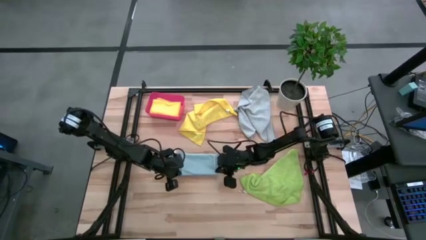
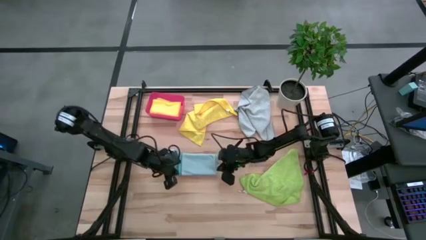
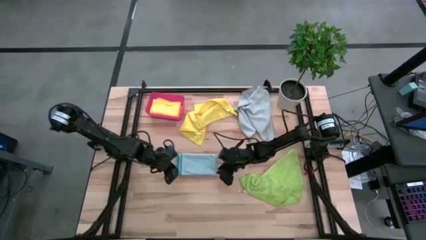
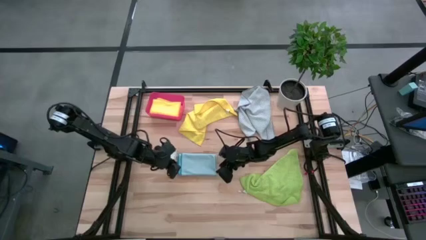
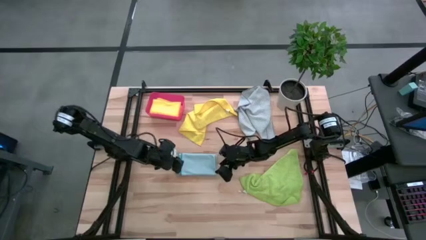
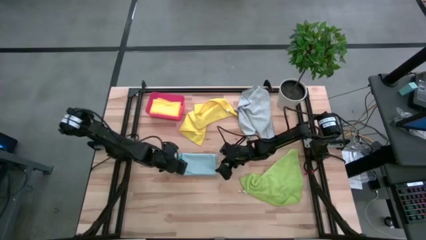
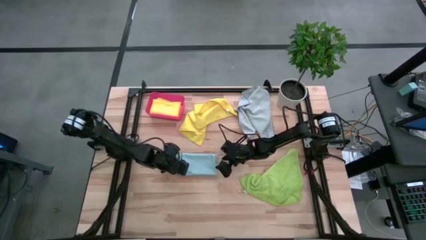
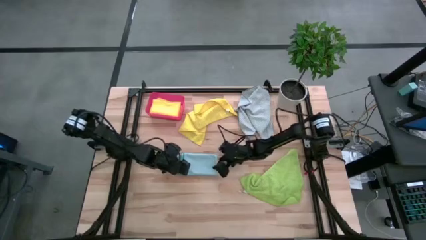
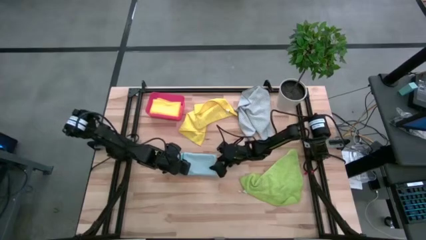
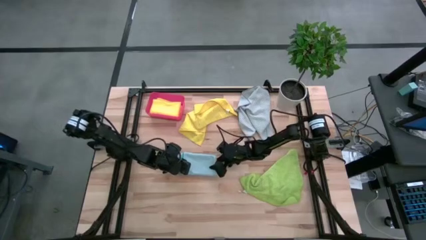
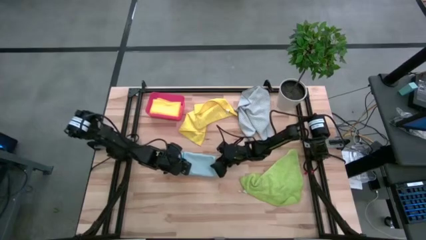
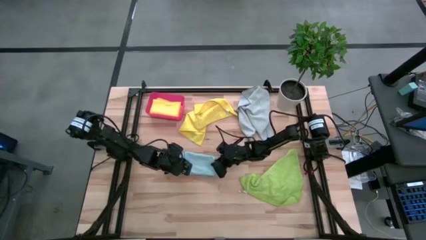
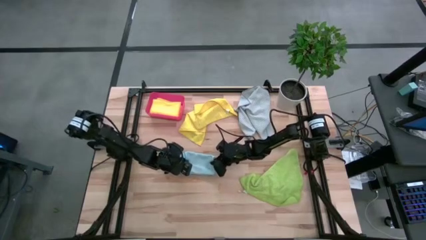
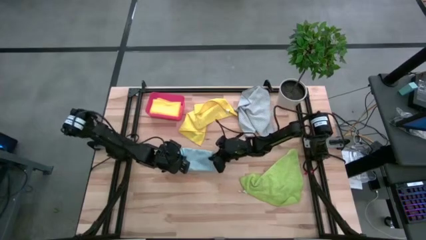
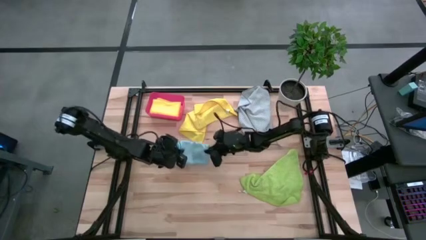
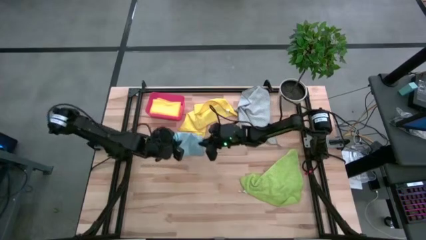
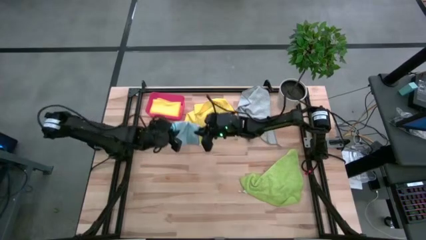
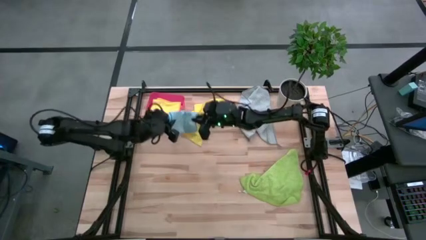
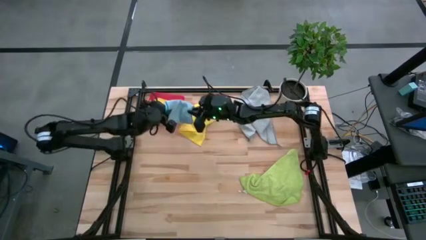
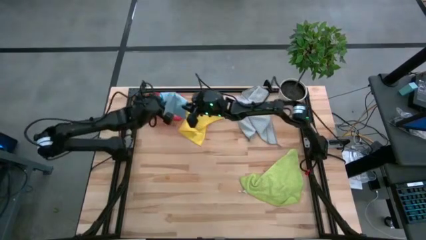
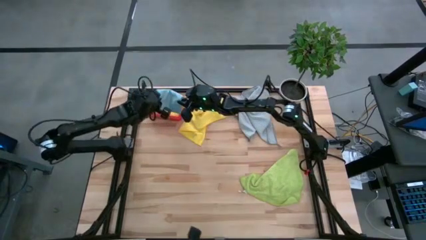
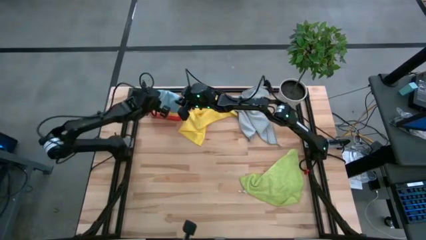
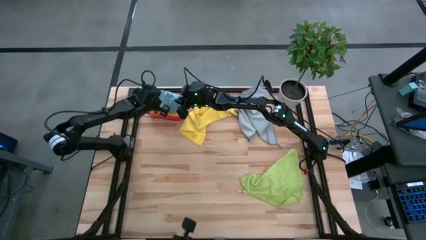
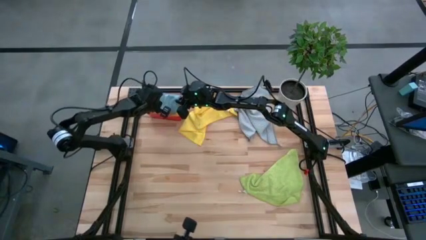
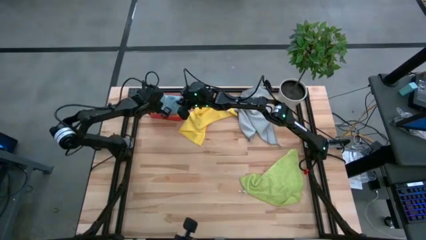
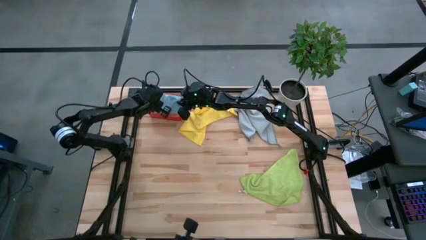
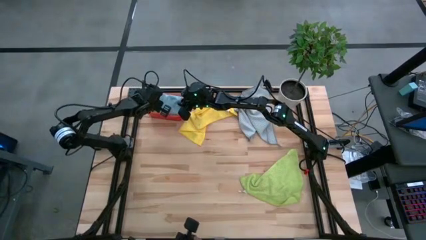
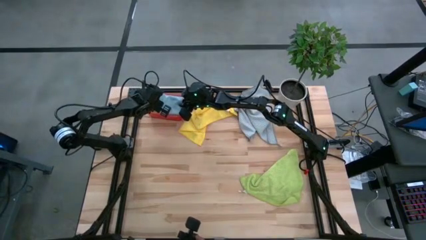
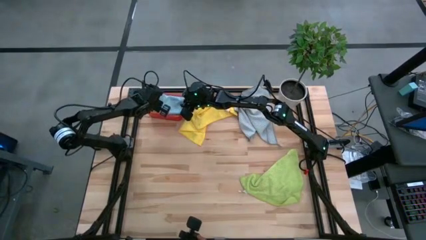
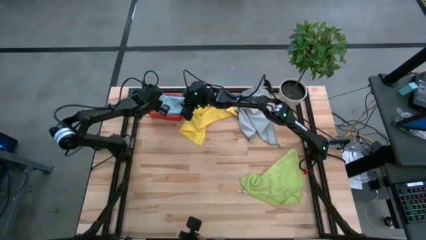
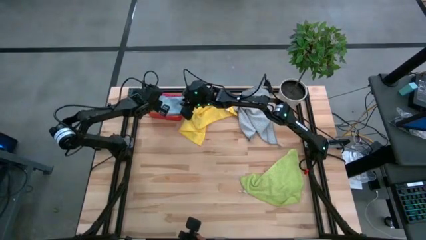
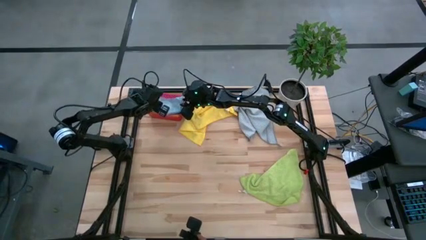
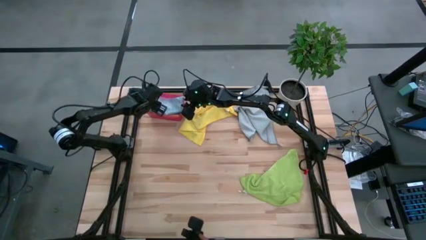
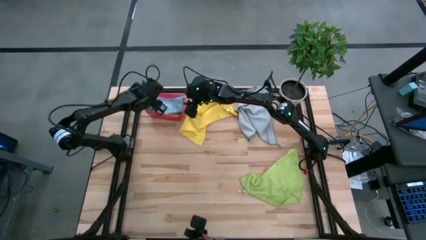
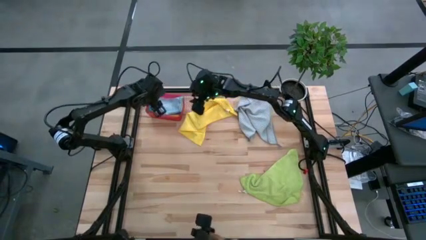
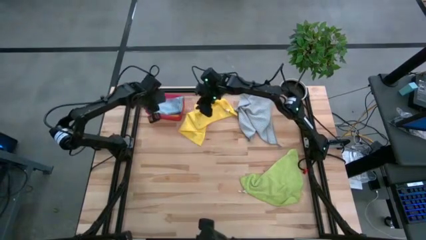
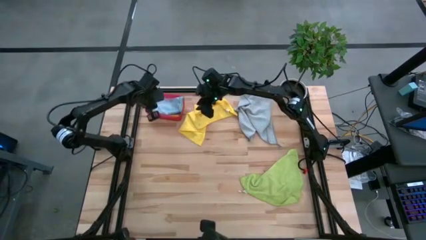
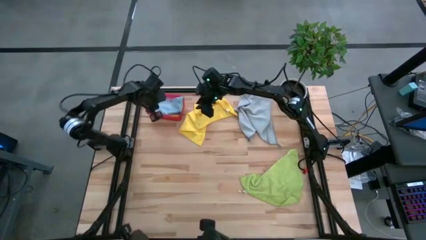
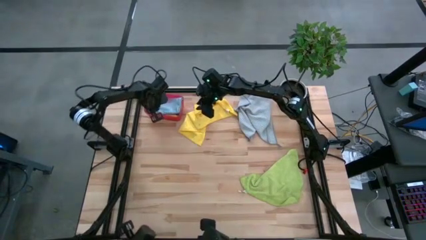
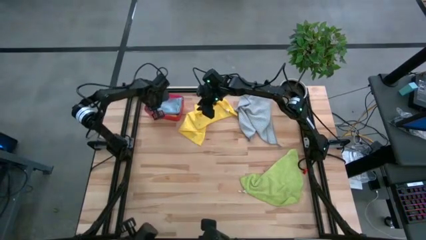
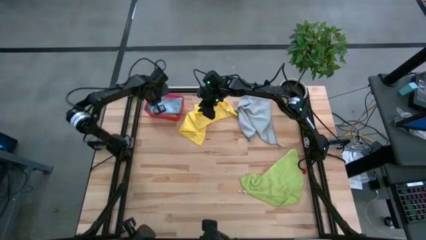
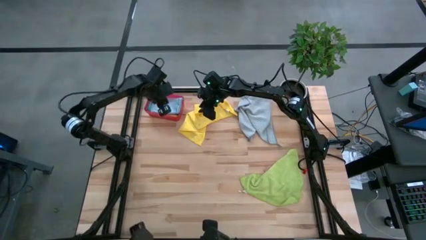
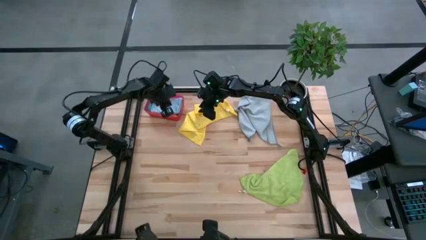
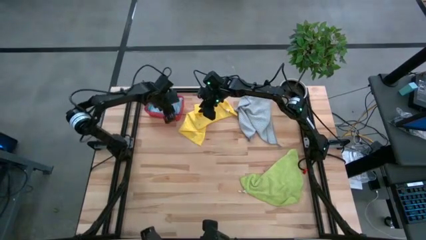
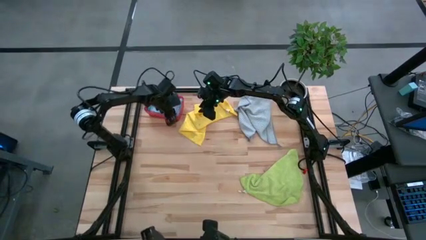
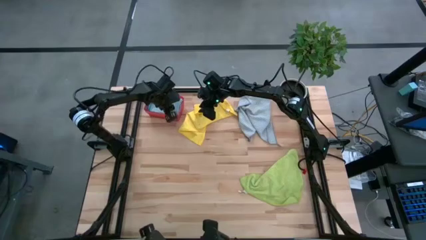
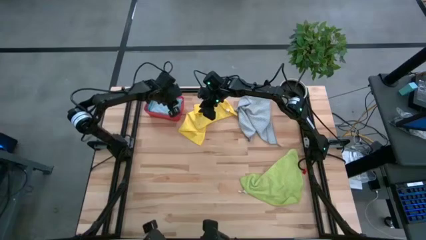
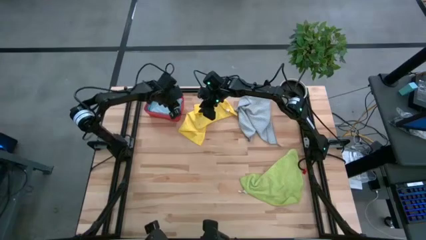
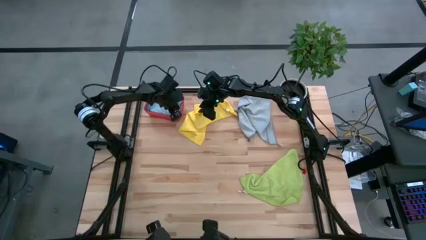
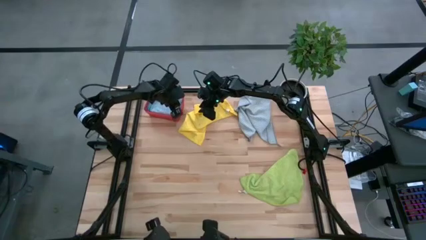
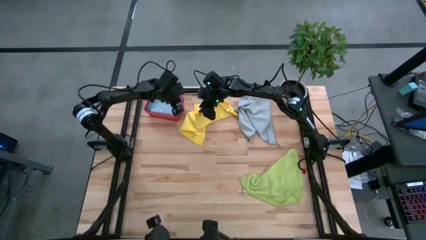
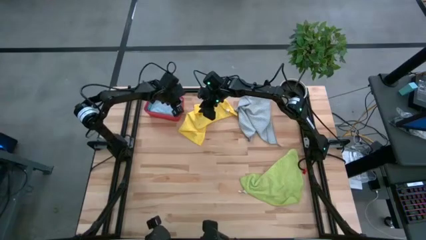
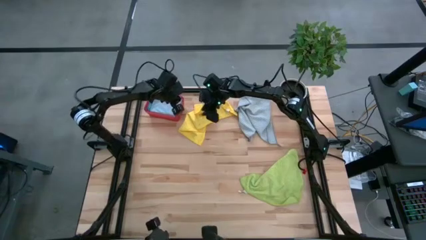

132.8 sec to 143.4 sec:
Task: Fold microfiber towels
Put the folded light blue microfiber cloth into the red bin

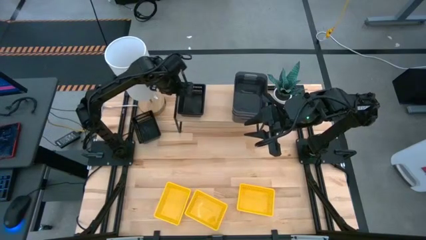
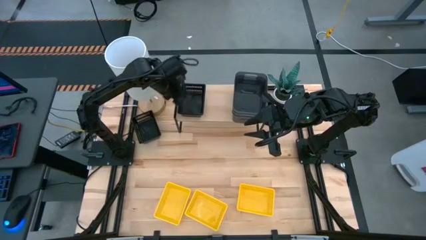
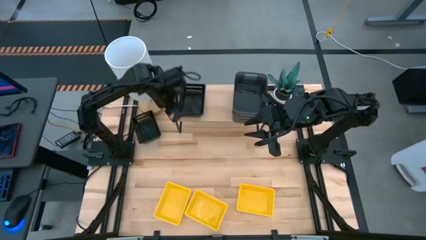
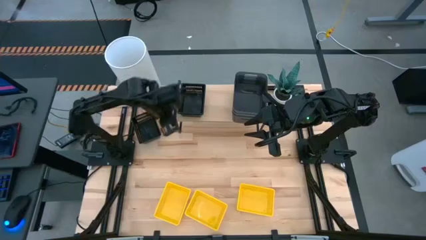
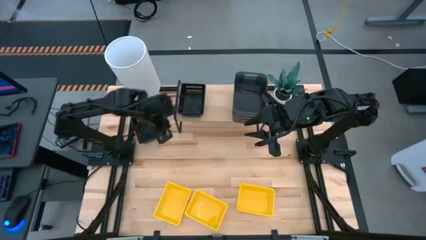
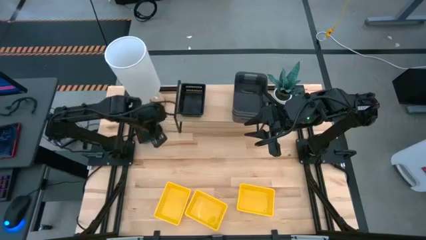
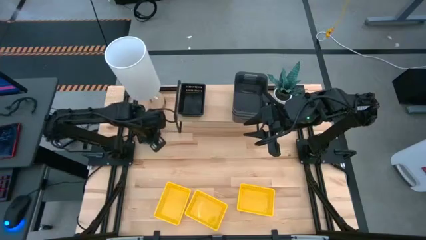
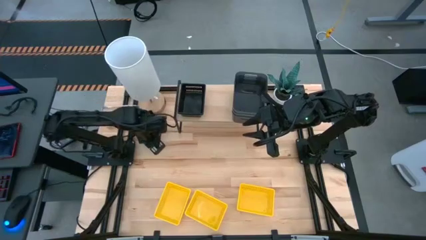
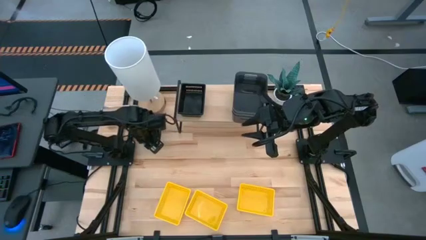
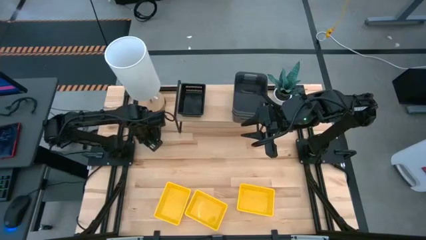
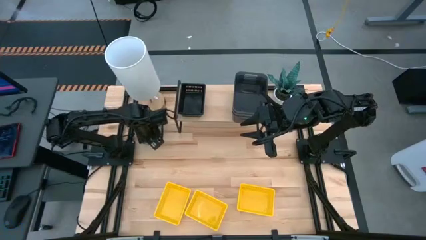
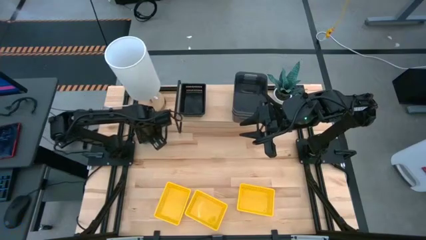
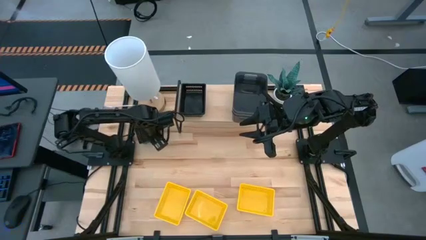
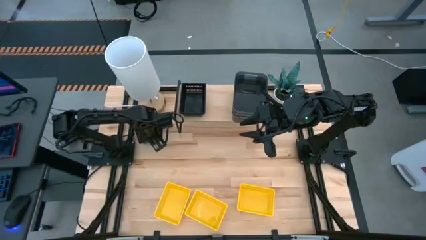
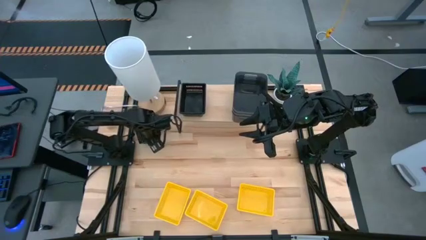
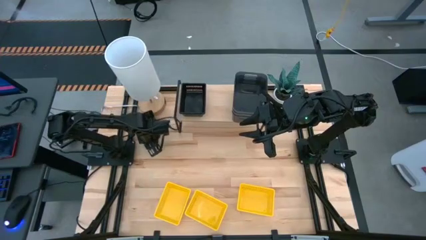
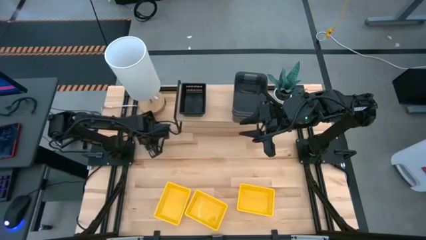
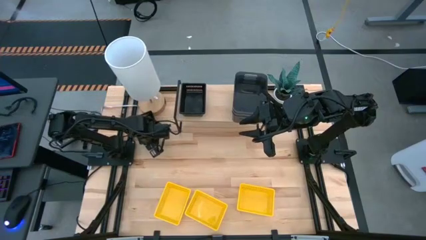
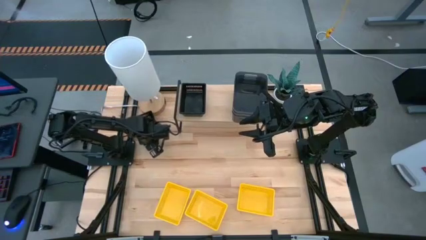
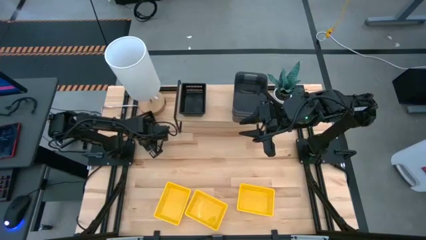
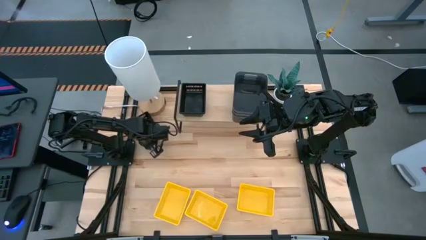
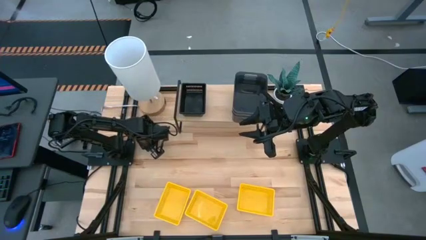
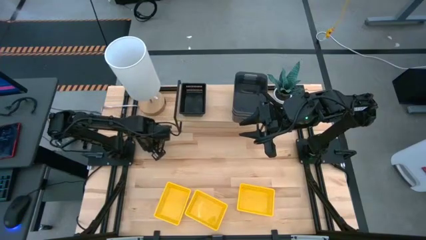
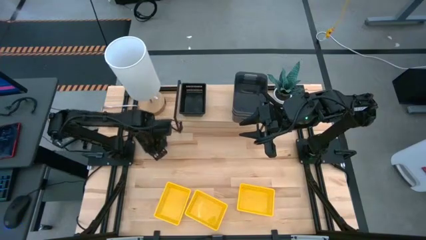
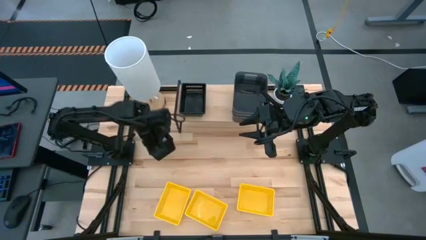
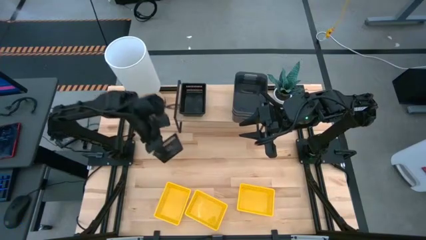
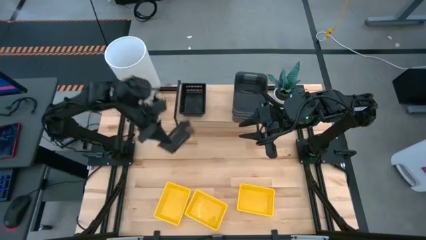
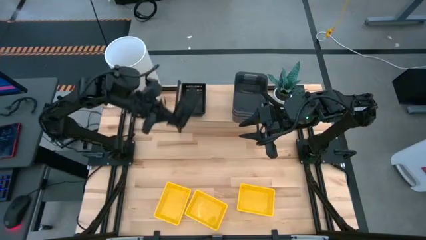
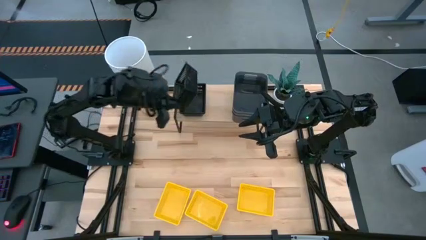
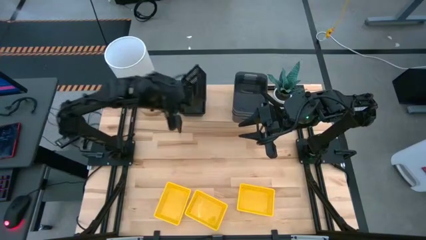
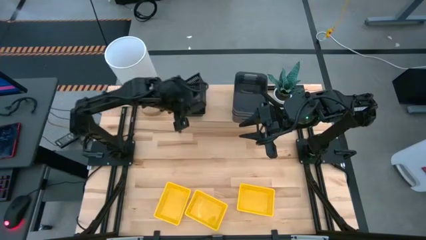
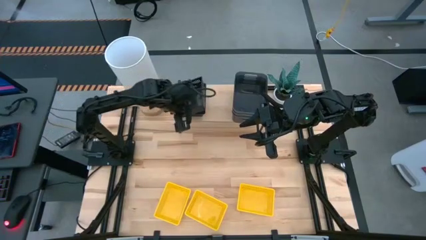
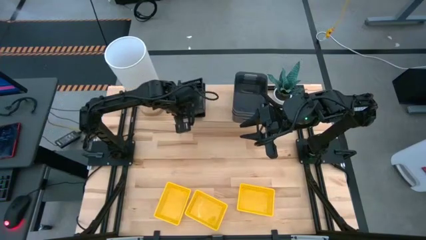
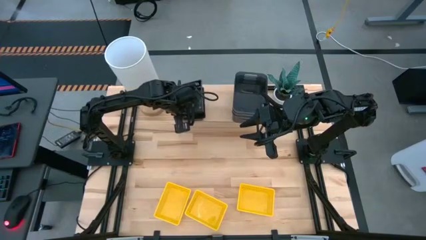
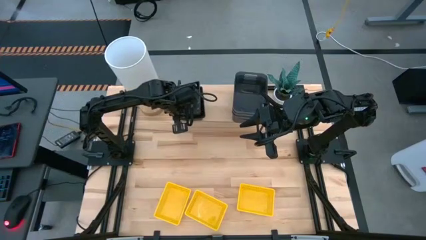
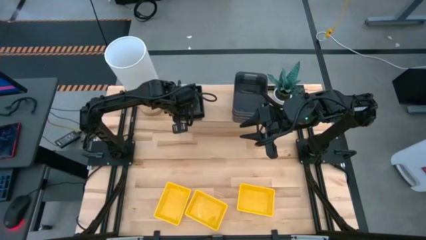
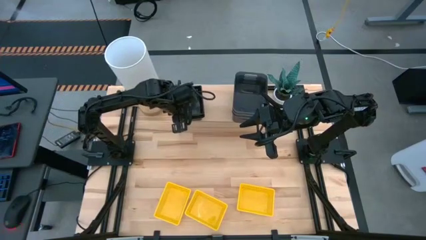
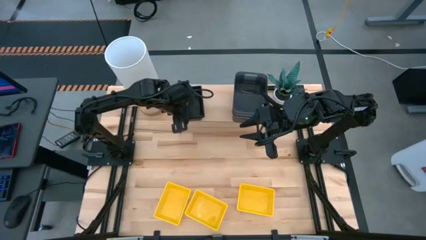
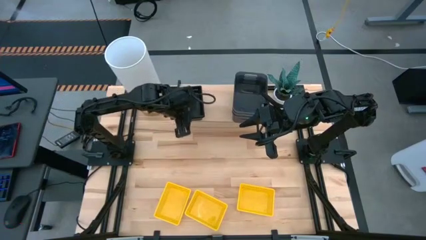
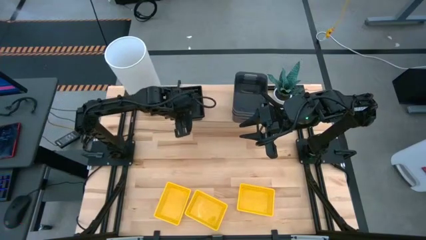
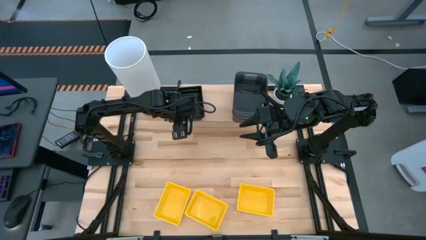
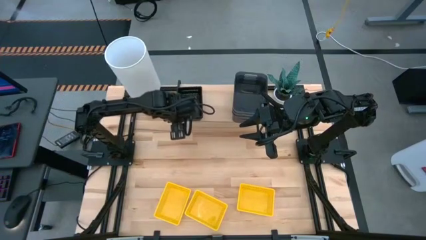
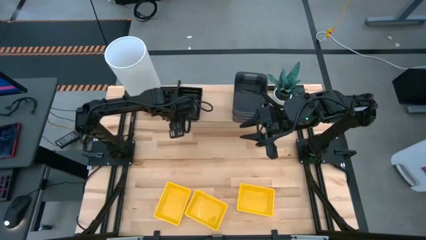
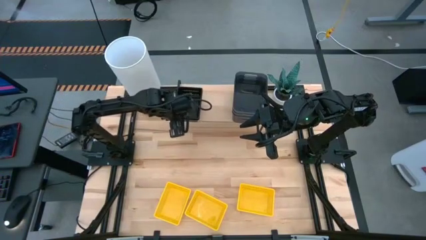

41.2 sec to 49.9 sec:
Task: Stack baskets on shelf by color
Stack the black basket on the top of the black basket on the shelf
